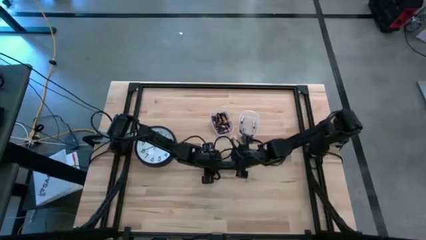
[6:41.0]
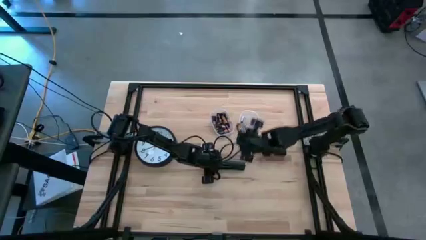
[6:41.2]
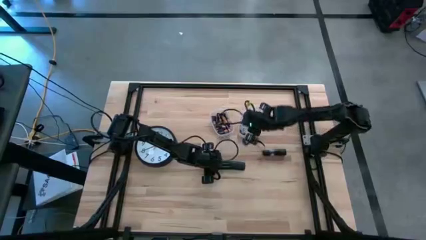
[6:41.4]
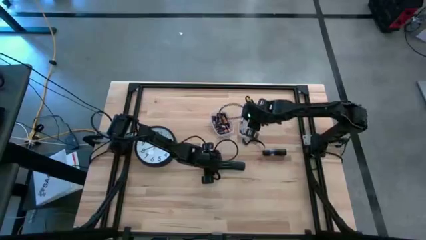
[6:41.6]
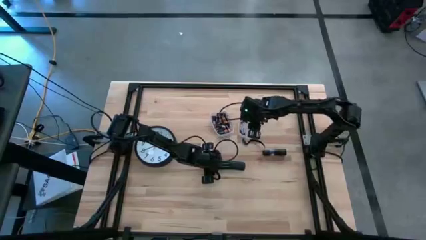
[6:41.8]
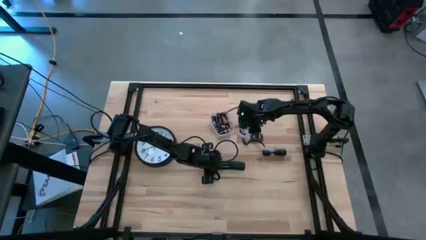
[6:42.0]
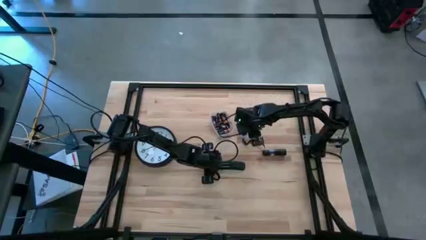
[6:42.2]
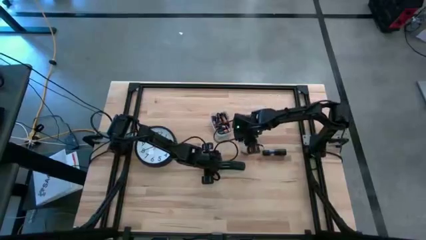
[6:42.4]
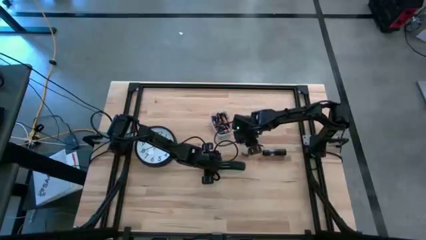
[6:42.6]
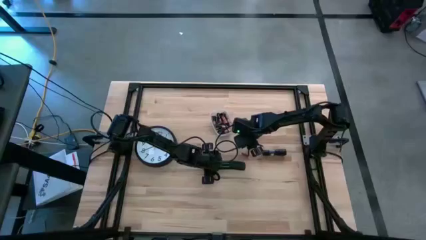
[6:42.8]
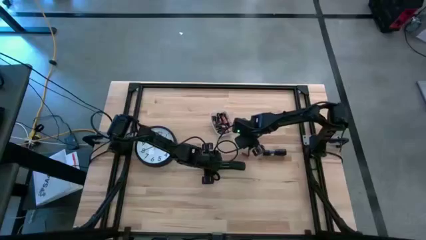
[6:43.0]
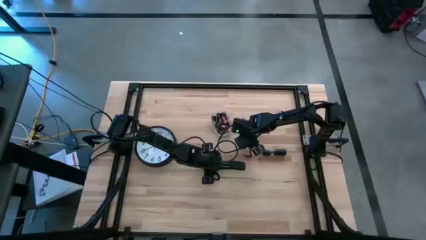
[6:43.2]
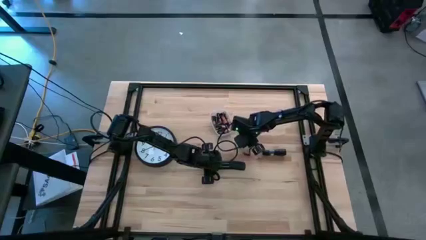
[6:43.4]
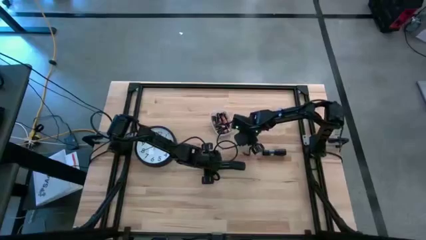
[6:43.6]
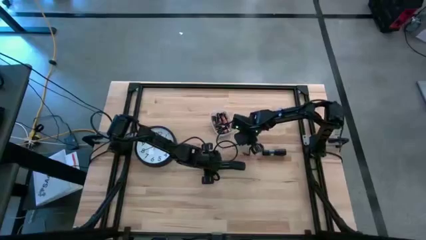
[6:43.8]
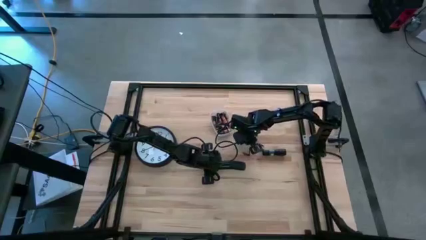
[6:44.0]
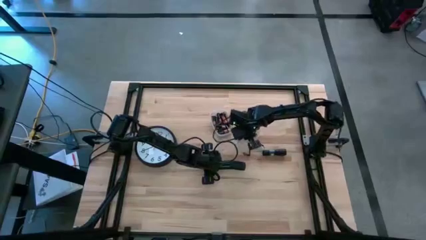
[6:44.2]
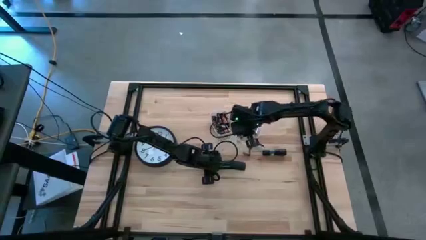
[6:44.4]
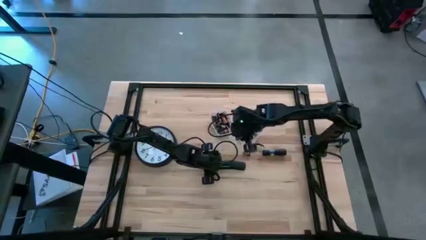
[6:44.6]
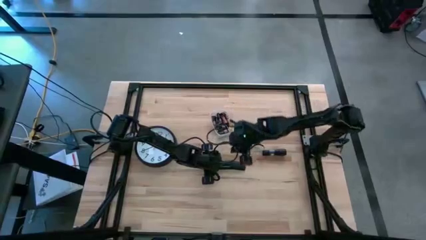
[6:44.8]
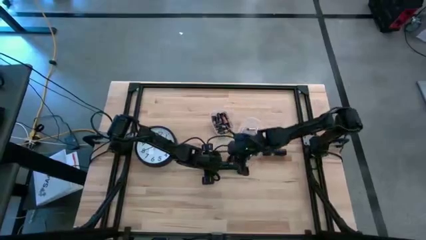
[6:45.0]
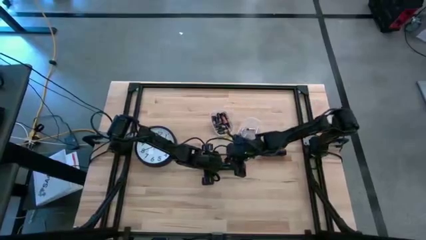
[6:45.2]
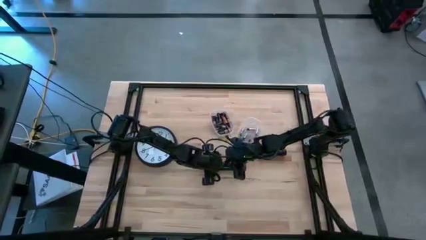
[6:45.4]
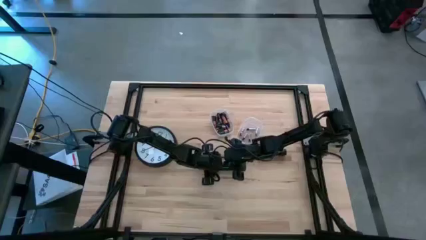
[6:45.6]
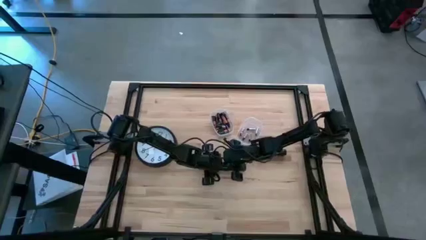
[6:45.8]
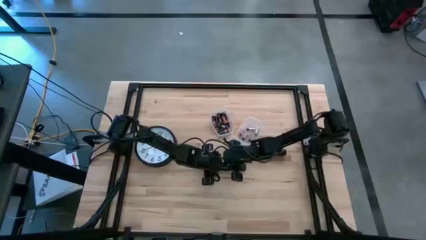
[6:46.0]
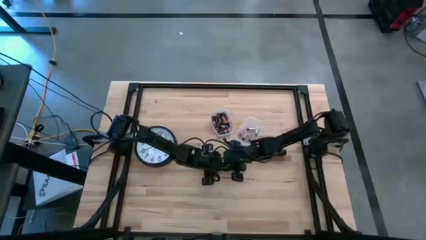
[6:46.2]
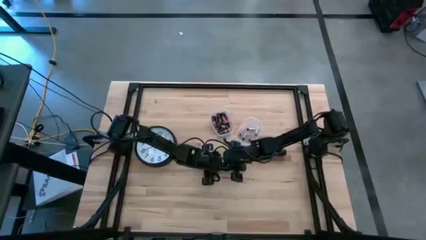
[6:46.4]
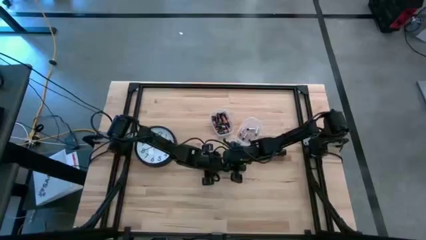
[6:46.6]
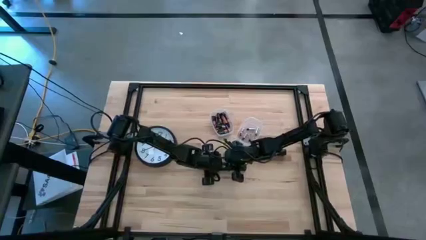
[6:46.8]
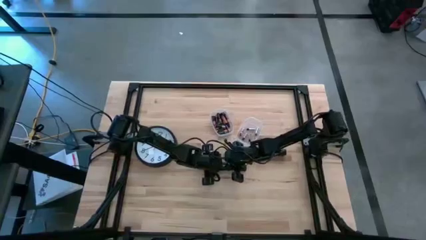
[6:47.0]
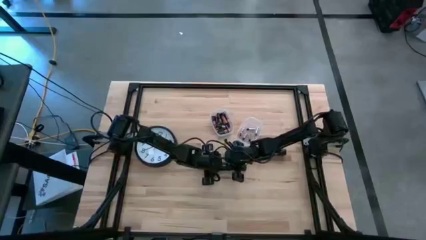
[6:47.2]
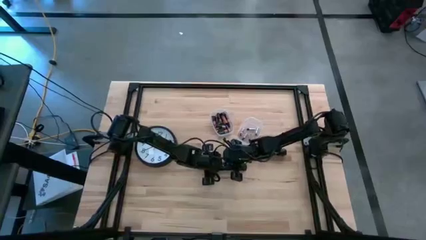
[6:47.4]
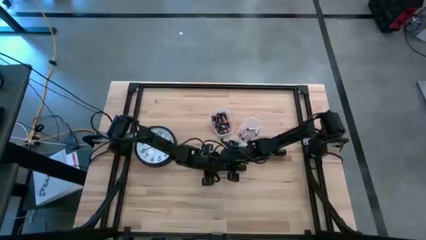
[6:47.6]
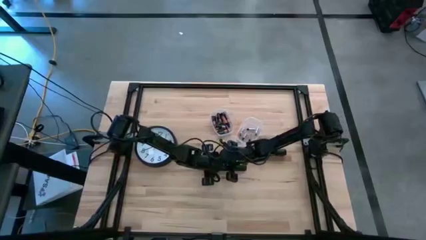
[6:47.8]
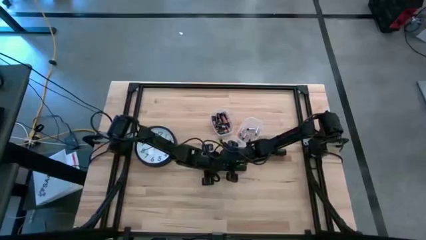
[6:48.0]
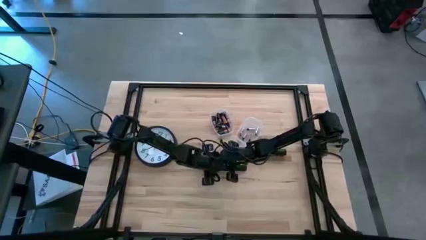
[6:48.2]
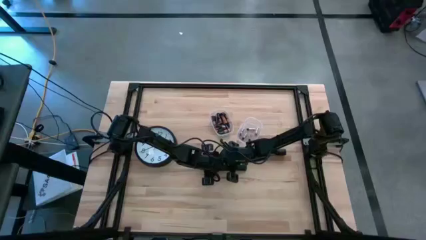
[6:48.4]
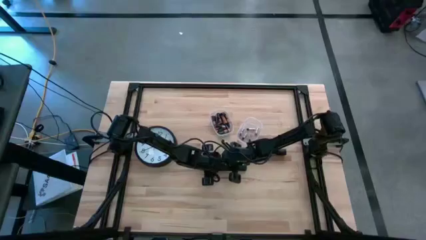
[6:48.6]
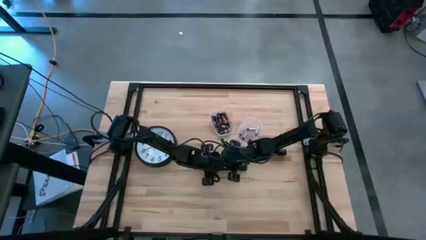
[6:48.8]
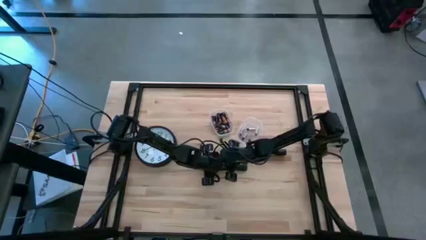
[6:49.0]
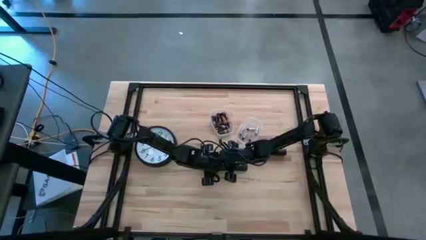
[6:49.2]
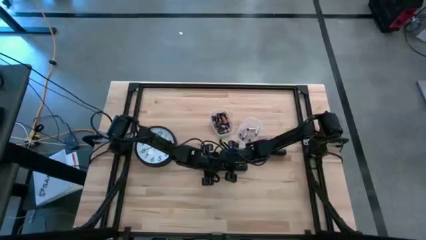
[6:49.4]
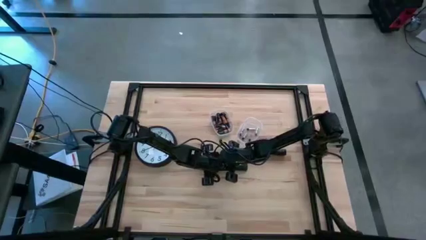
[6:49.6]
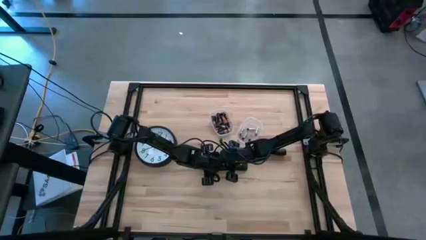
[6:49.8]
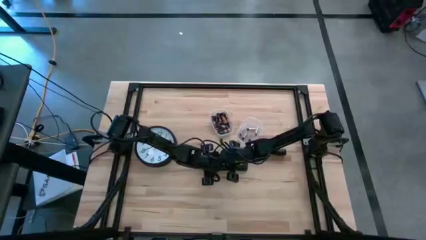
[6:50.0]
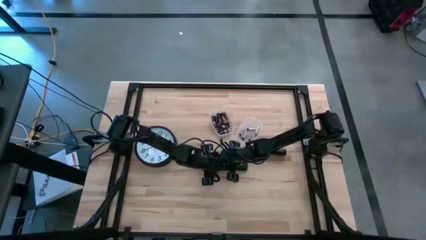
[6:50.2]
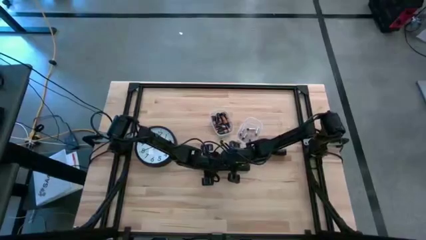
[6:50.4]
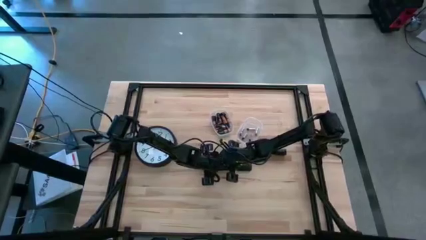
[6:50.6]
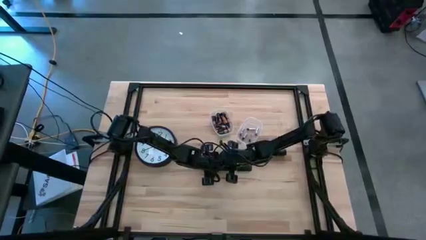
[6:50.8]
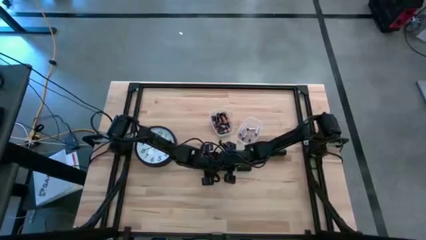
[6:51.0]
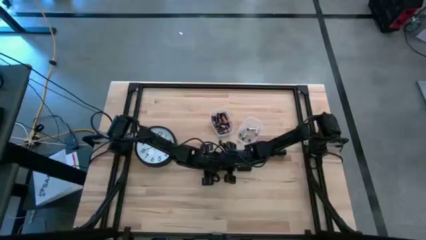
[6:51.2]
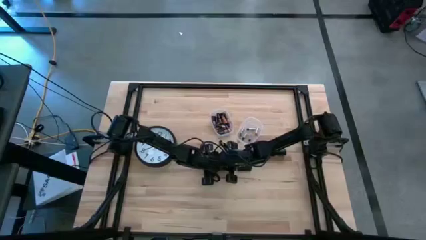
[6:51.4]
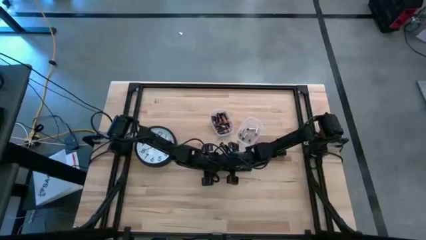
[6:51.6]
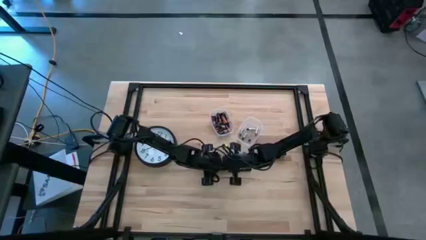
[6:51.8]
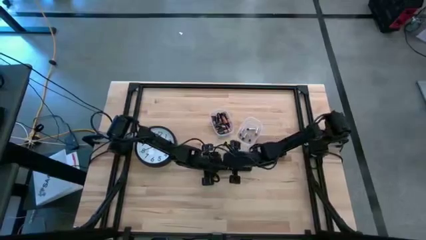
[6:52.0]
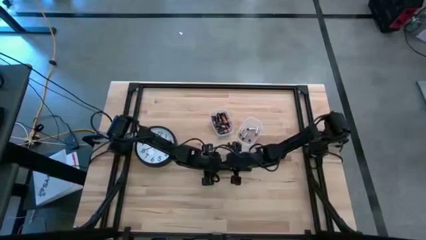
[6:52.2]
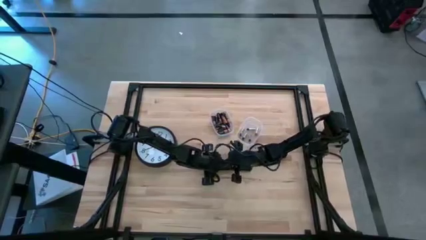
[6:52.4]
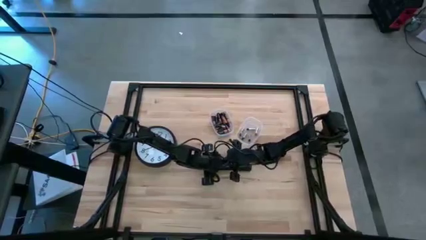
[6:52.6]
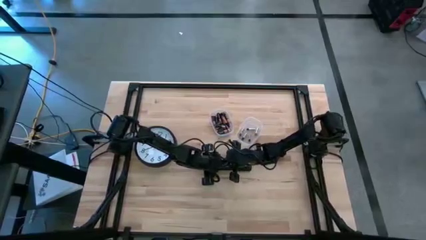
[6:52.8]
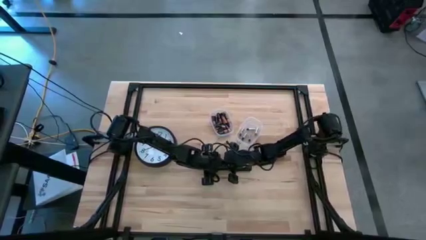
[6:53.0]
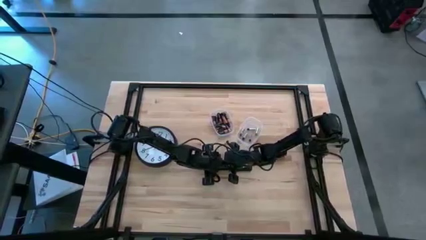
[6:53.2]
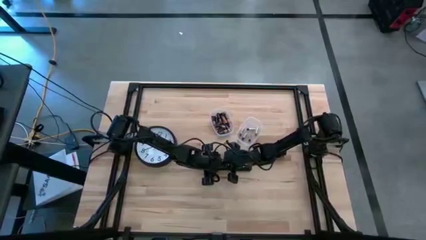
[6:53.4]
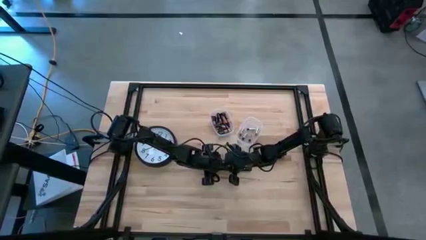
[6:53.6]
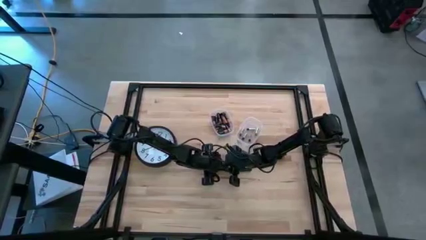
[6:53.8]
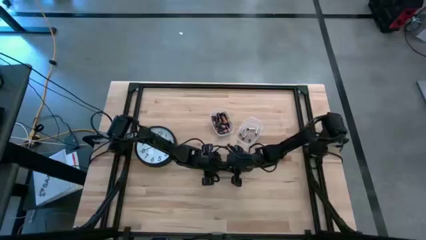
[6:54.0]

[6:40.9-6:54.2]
Task: Insert battery
Insert the silver battery into the black remote

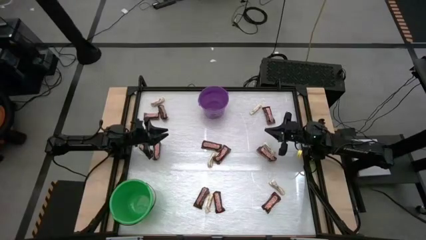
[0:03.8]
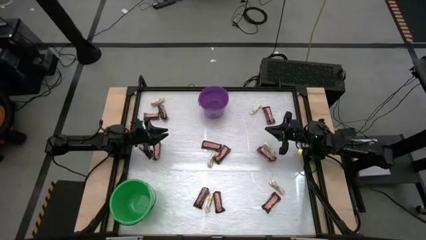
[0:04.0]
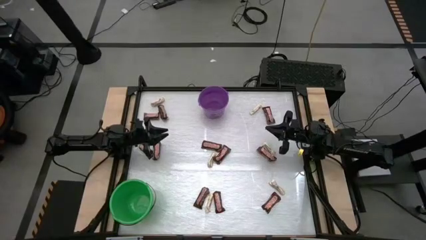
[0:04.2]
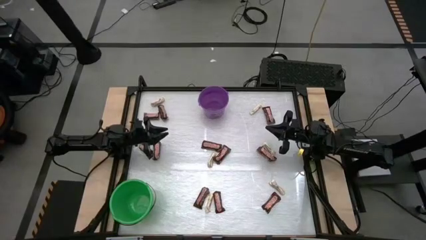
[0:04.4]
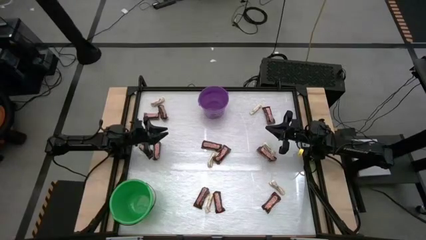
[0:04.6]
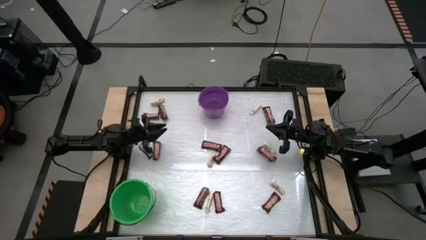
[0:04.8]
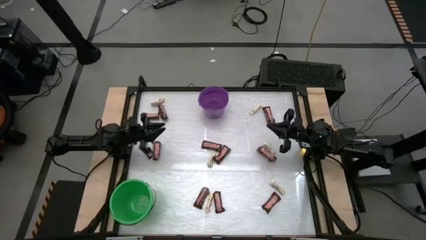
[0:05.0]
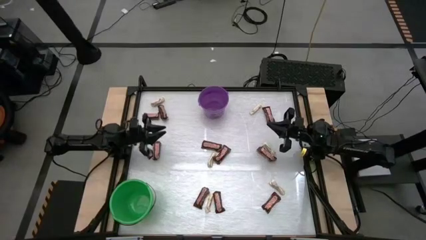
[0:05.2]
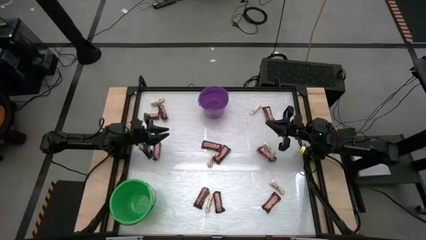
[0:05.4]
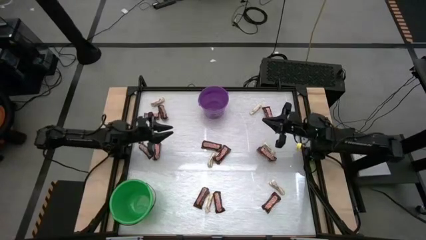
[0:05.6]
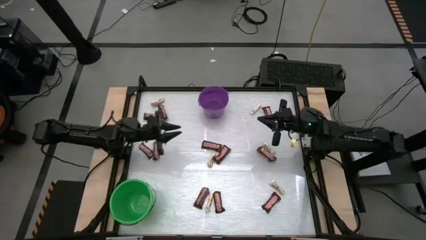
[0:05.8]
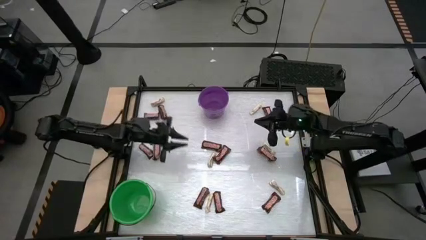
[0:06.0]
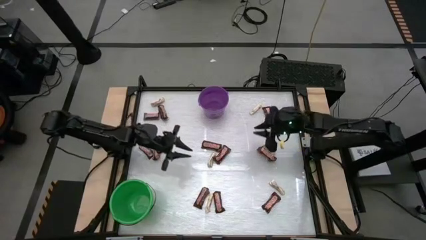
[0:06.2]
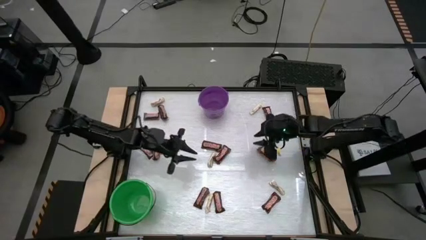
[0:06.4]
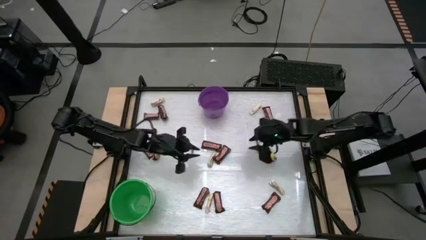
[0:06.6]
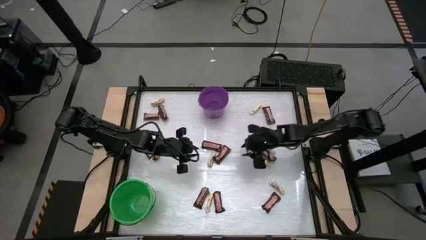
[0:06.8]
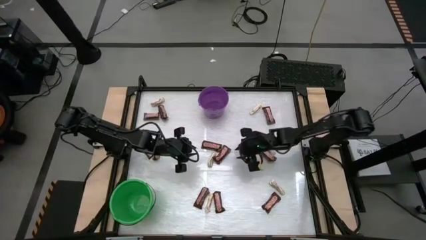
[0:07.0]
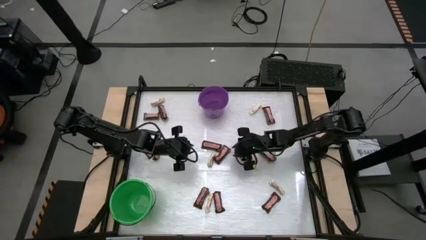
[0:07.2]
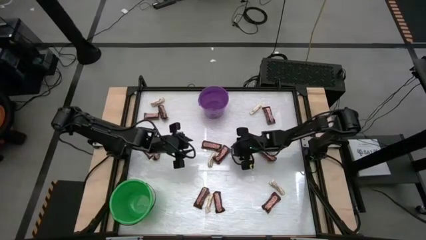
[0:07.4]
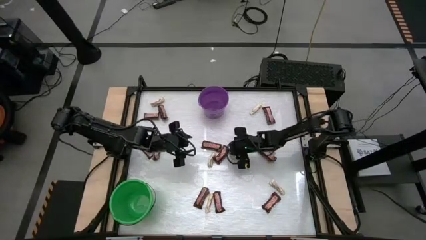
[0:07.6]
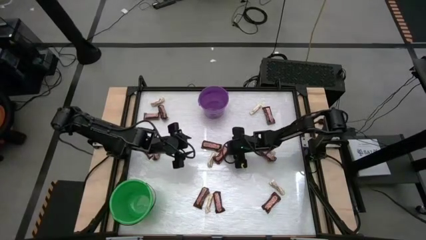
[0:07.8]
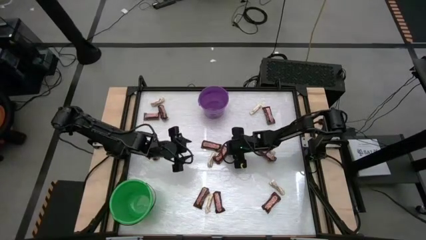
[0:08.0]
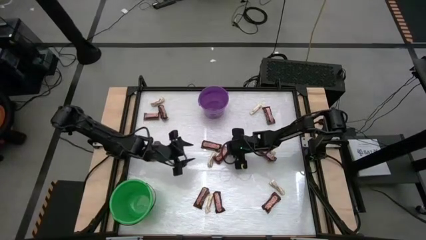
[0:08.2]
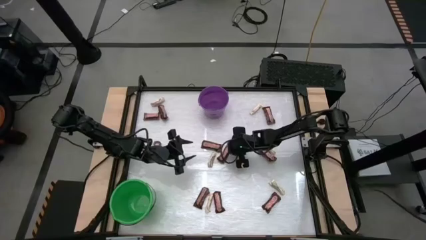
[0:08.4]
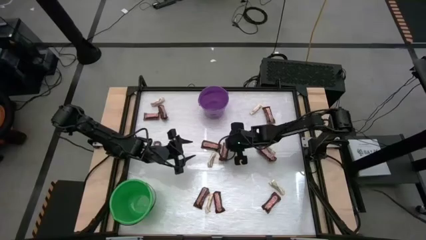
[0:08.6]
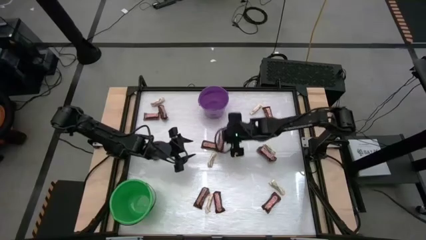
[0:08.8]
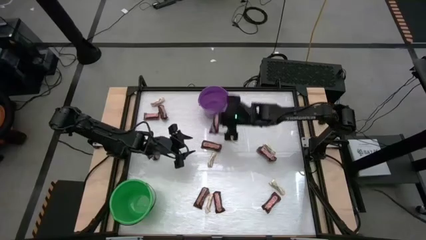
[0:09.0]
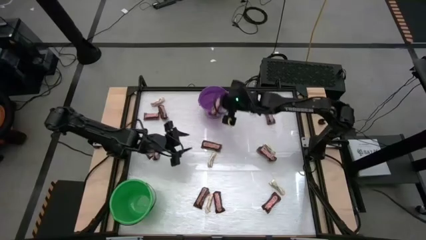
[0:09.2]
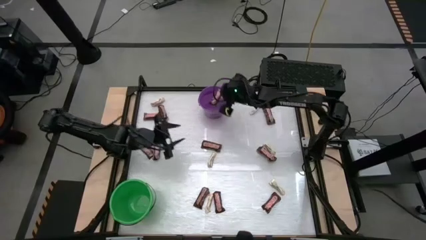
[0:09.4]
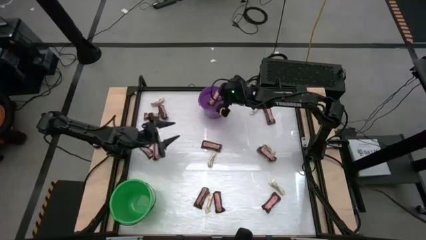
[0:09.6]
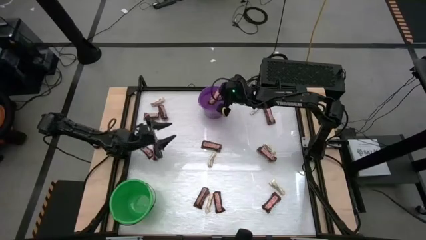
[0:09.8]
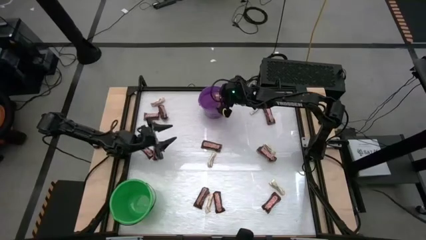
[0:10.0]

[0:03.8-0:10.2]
Task: Sort candy by brand, put in halloween buckets
Put the brown chocolate into the purple bucket
